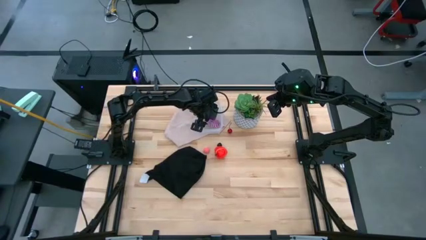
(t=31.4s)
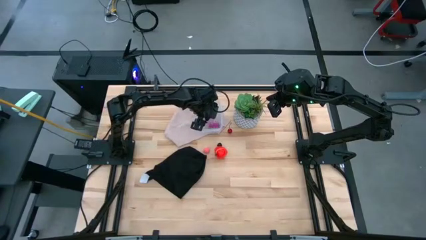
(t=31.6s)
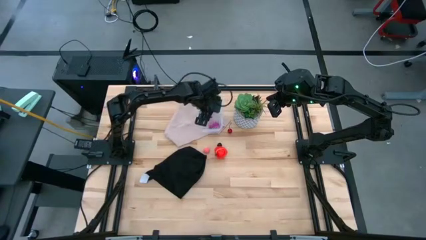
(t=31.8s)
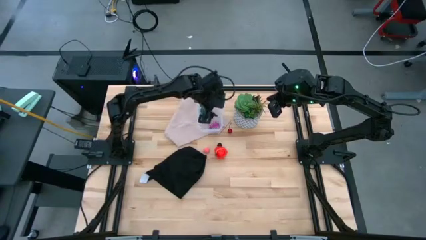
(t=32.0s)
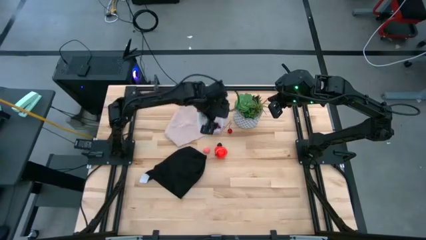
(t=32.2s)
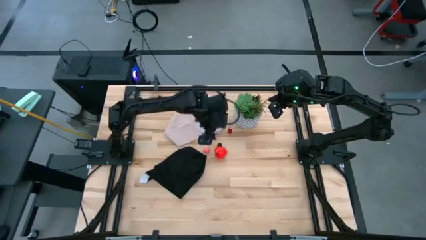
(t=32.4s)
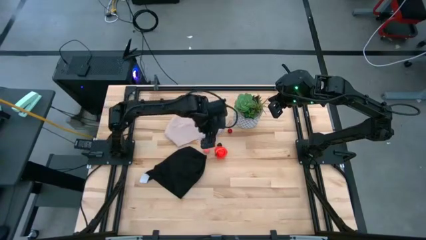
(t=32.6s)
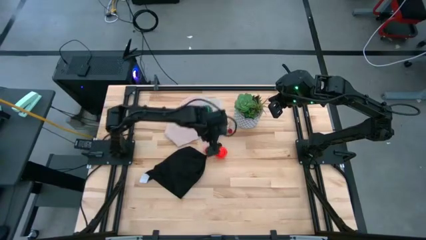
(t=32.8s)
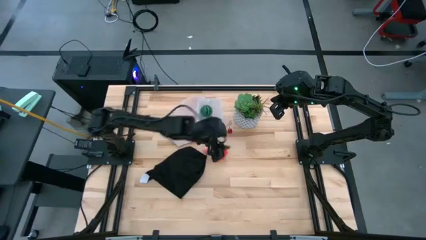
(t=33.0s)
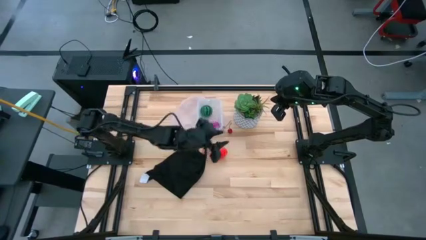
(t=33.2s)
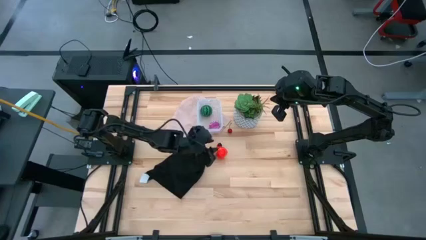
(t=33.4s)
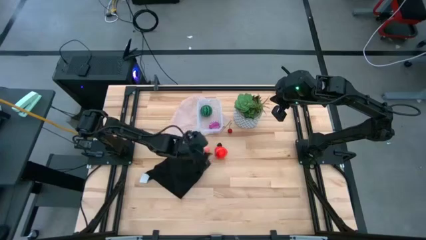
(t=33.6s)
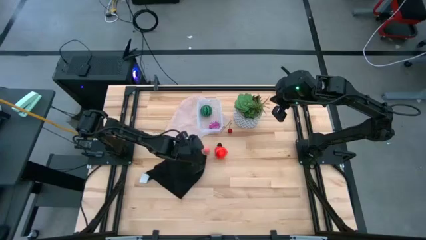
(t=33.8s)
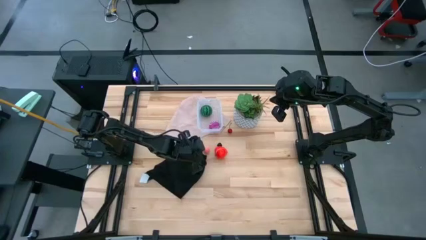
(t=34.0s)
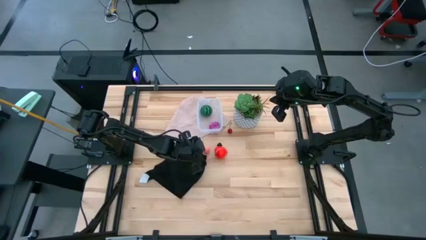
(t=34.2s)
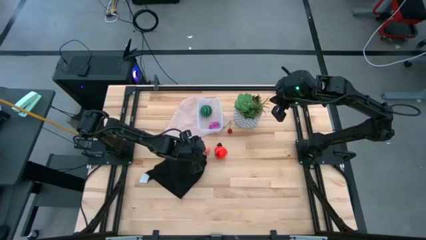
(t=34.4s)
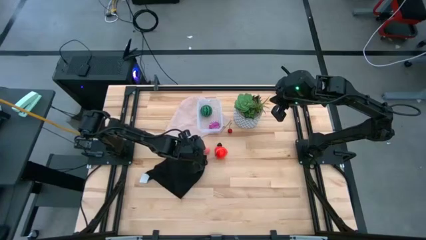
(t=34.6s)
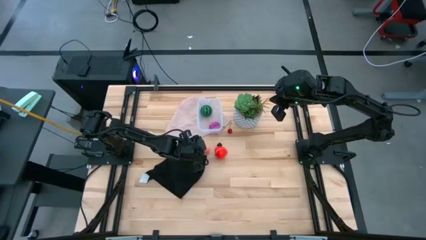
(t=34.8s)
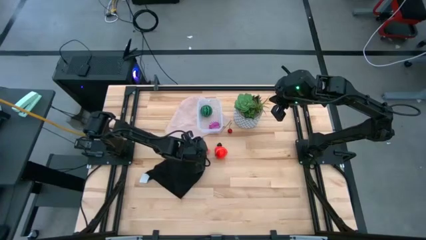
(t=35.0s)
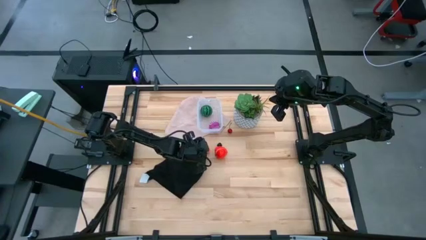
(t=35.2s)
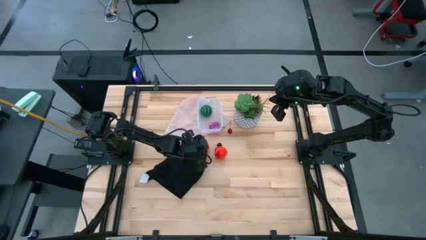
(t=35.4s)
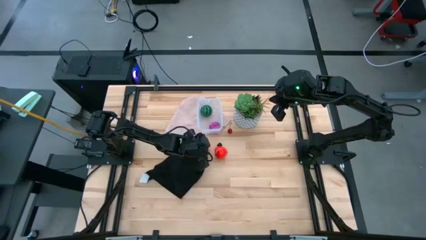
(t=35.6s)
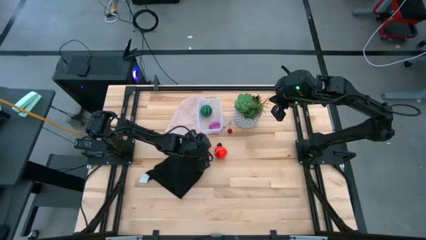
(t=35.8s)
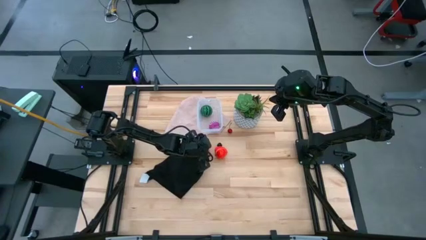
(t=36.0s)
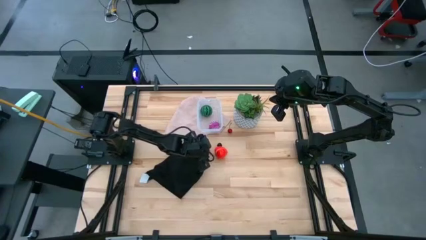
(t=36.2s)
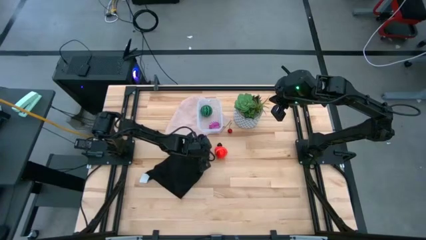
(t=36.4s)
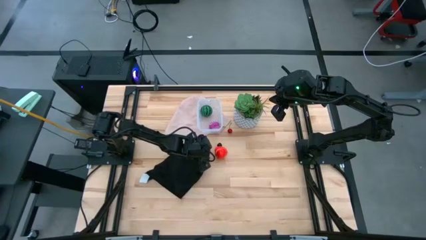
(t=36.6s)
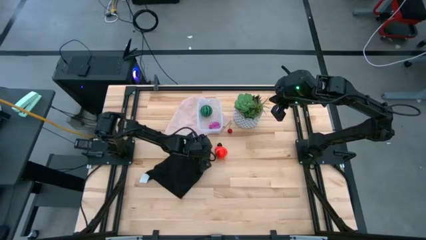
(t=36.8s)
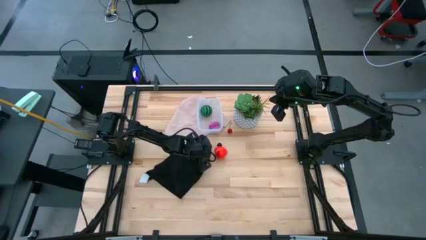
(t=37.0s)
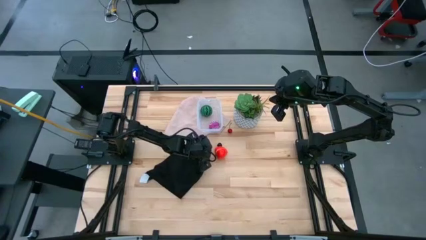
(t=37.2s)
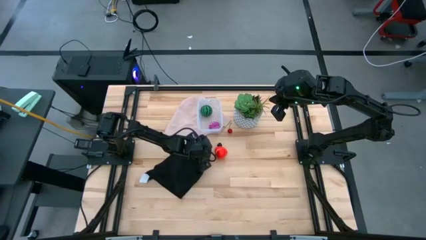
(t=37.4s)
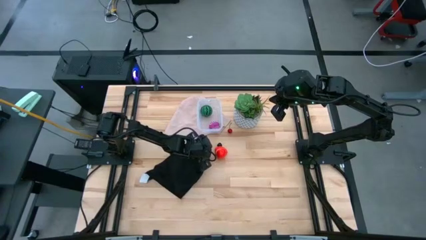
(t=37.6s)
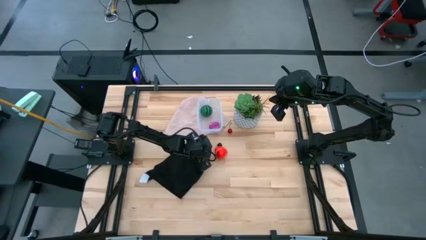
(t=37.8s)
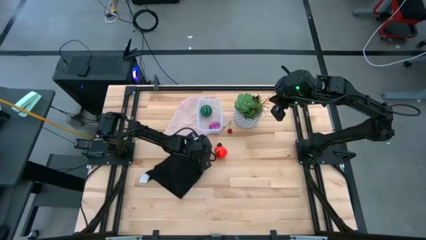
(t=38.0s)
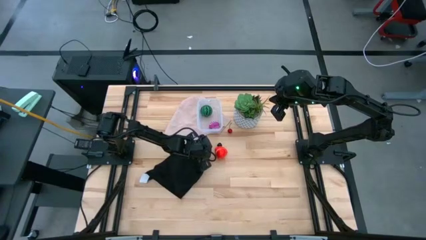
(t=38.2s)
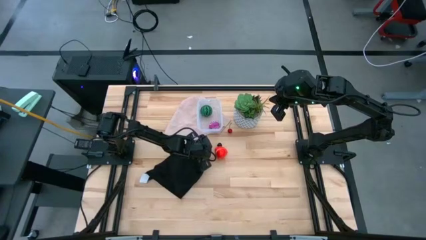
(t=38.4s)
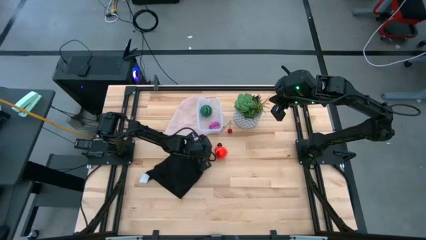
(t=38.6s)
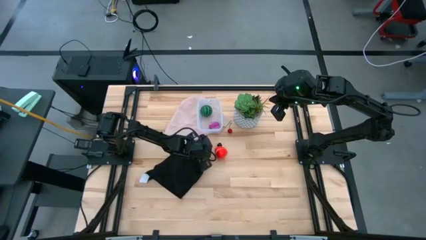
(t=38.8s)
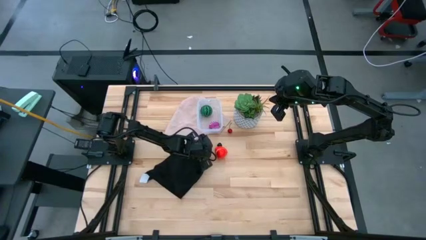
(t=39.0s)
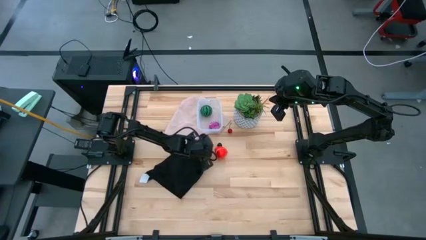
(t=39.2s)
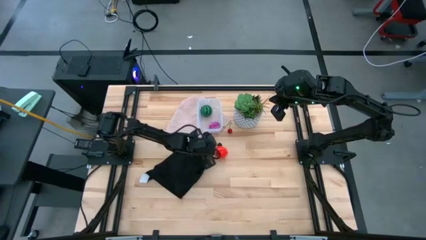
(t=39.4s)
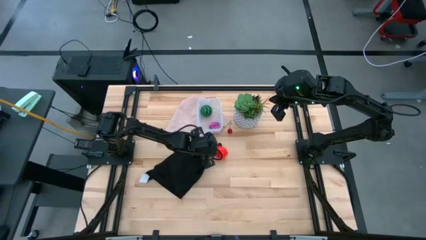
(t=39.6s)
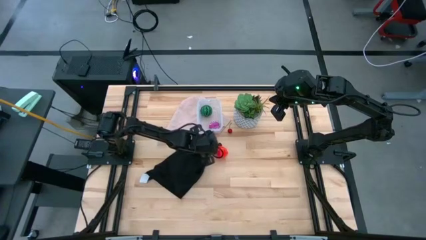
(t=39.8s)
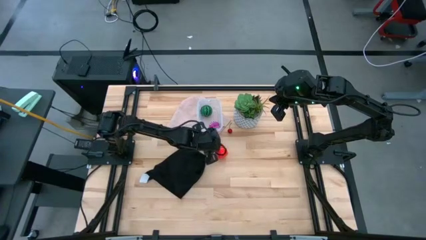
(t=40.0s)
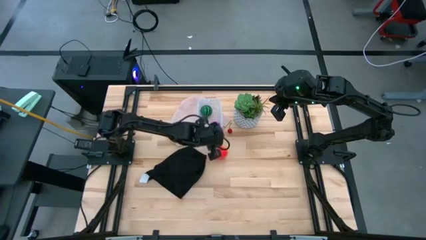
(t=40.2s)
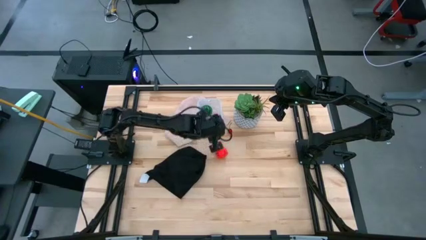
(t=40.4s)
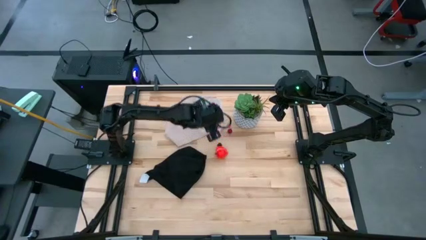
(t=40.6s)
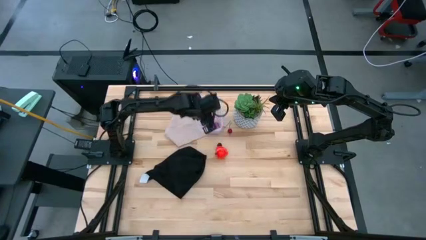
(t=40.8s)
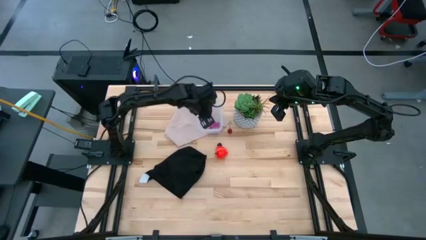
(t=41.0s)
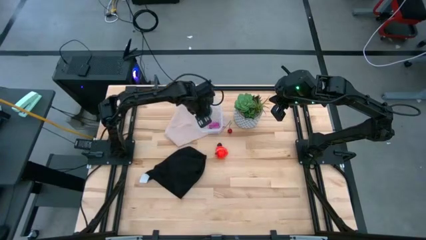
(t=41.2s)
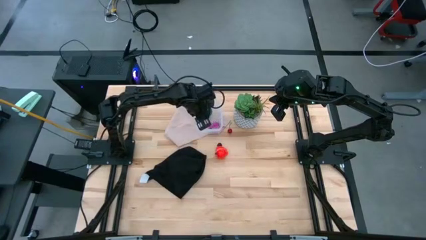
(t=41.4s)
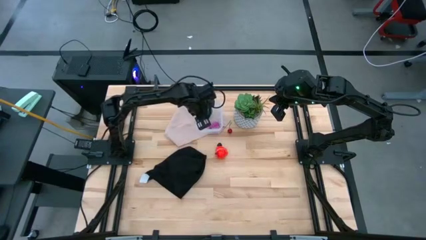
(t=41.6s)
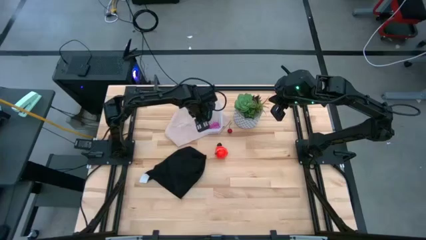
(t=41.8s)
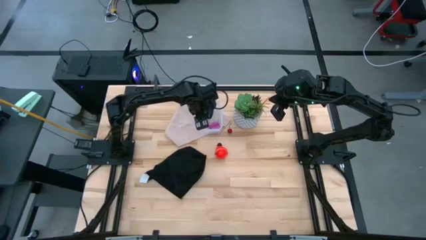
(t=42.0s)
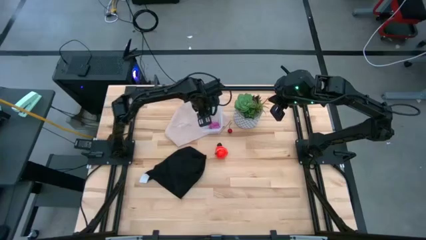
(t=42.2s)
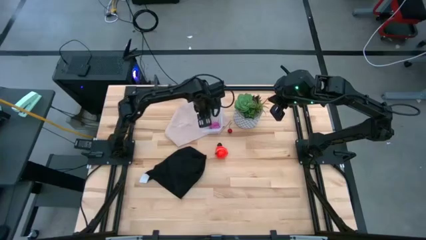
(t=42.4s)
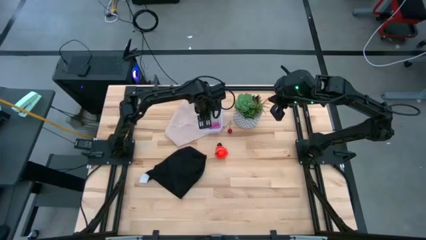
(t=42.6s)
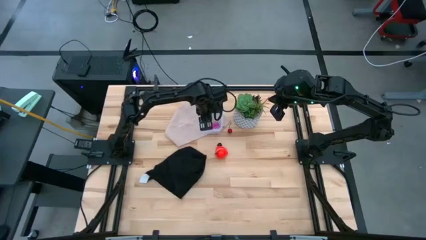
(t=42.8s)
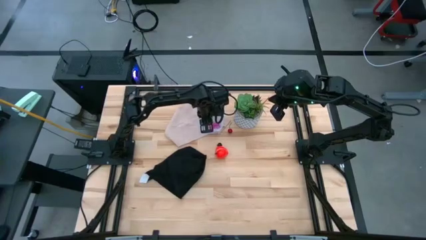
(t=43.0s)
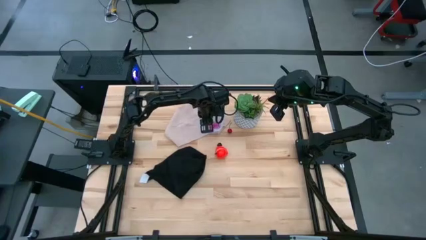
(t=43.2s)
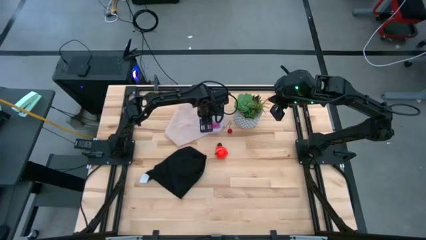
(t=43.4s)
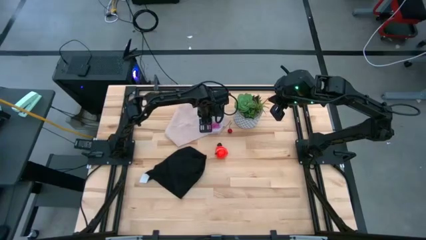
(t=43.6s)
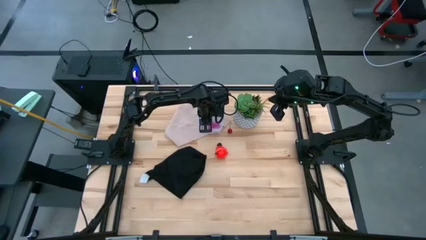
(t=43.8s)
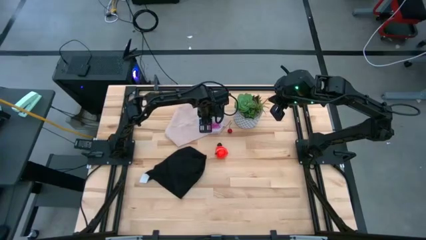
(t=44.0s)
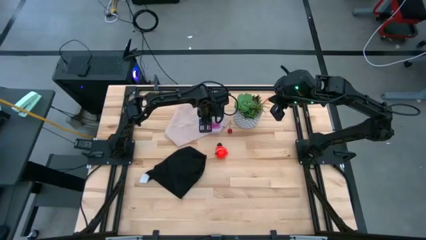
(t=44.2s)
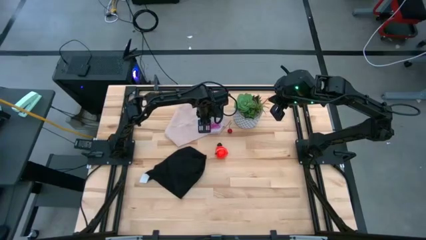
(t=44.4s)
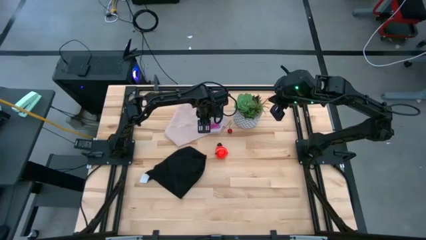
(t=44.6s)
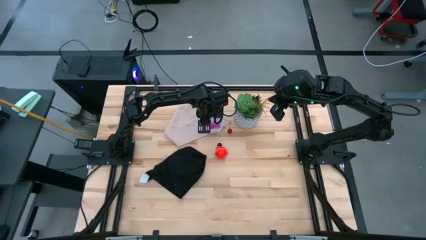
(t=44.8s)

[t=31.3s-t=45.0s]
Task: Pick and placing Produce into tupperware
Put the peach into the transparent bin
